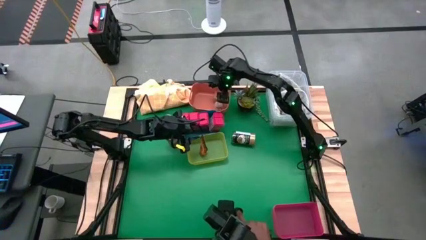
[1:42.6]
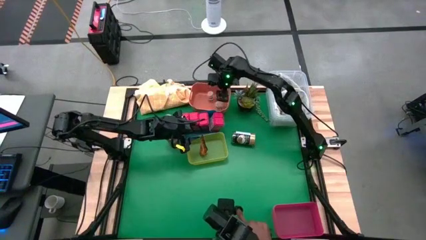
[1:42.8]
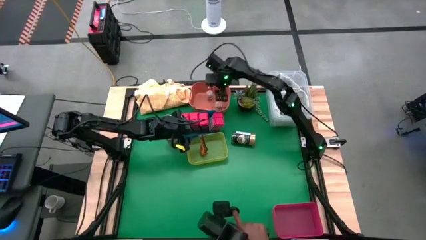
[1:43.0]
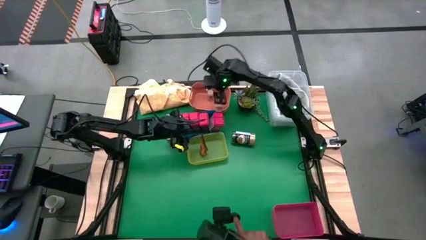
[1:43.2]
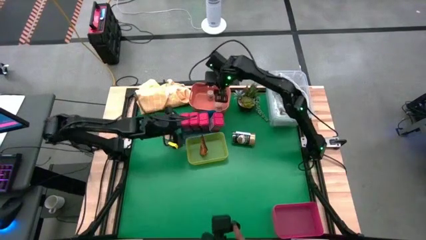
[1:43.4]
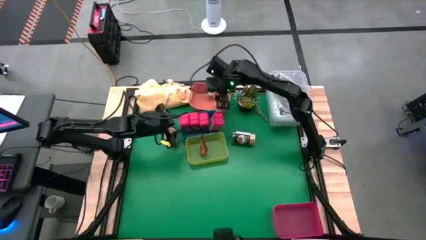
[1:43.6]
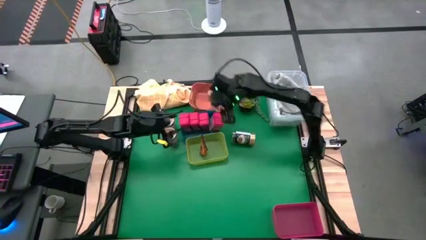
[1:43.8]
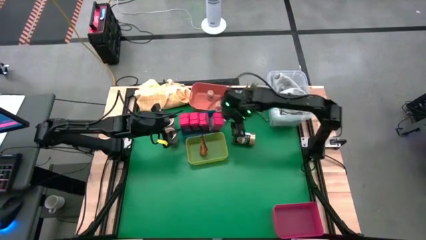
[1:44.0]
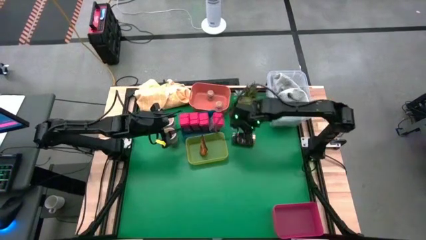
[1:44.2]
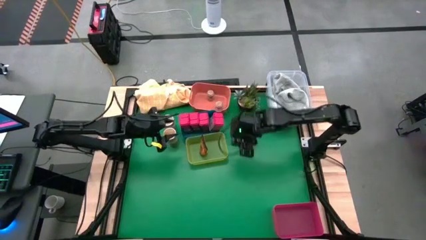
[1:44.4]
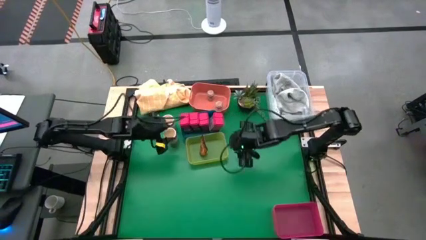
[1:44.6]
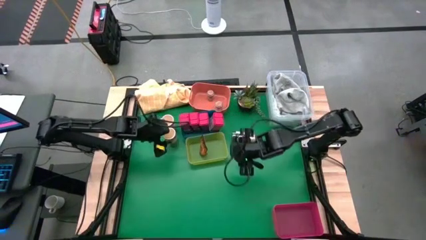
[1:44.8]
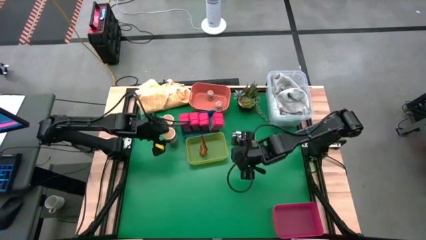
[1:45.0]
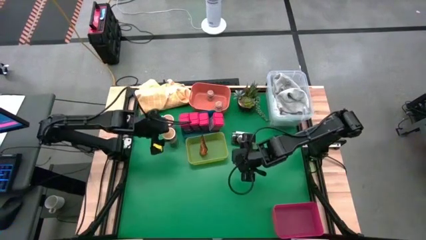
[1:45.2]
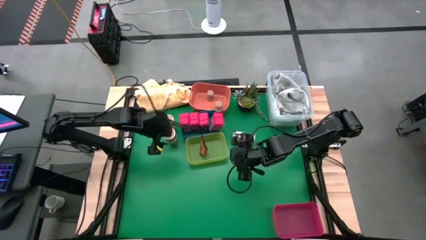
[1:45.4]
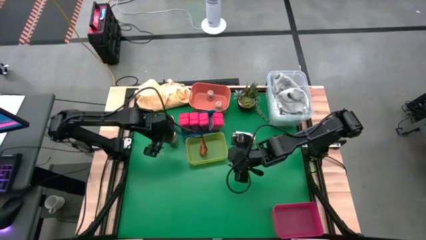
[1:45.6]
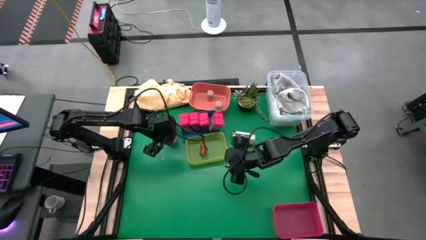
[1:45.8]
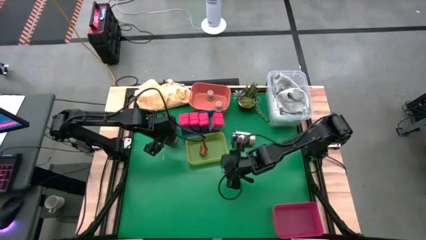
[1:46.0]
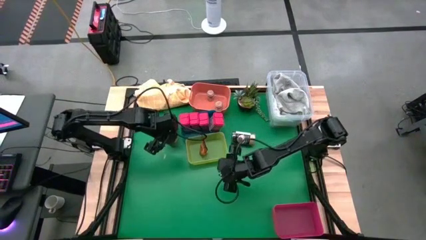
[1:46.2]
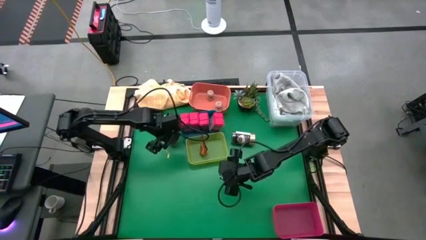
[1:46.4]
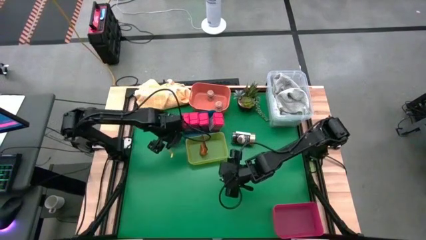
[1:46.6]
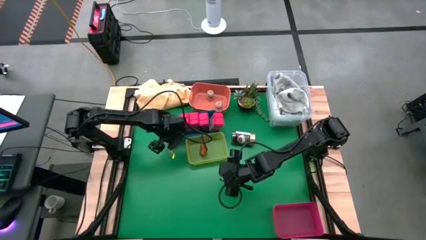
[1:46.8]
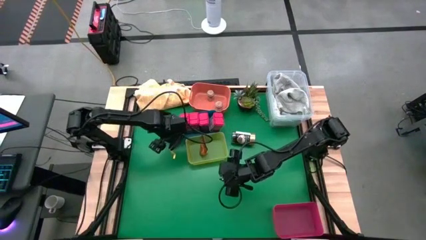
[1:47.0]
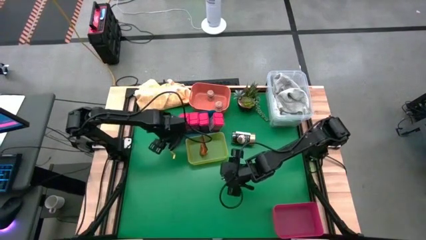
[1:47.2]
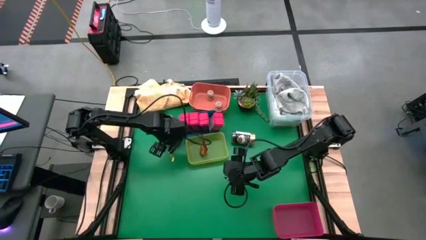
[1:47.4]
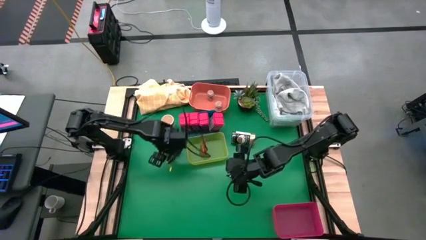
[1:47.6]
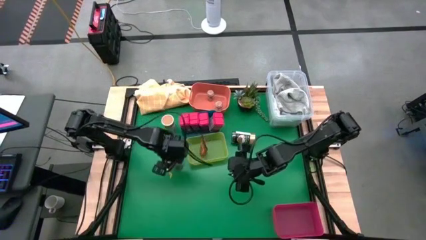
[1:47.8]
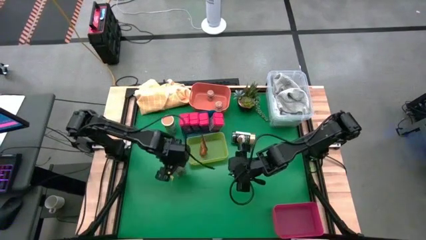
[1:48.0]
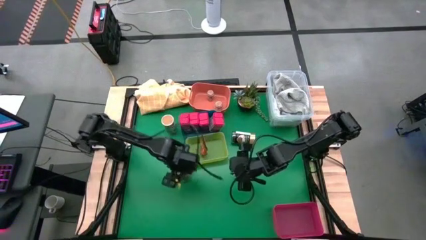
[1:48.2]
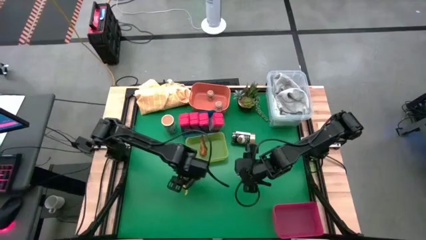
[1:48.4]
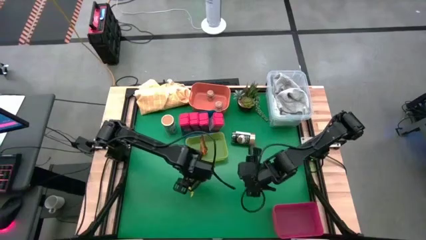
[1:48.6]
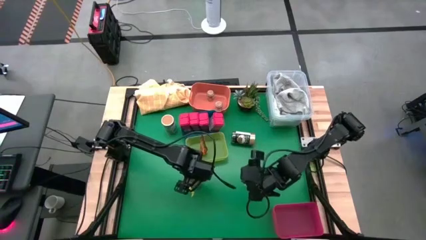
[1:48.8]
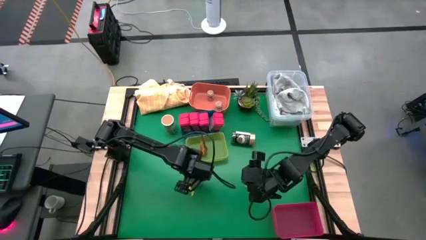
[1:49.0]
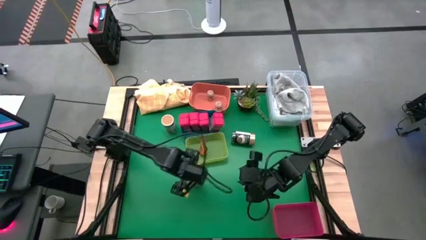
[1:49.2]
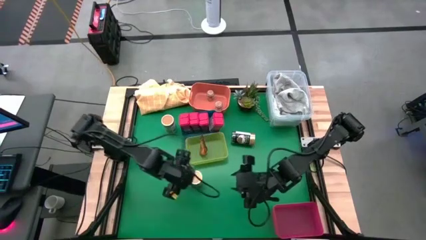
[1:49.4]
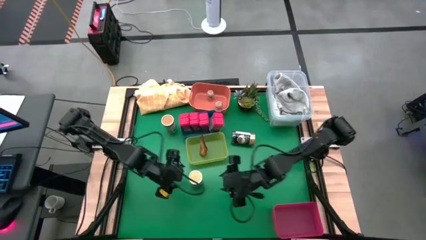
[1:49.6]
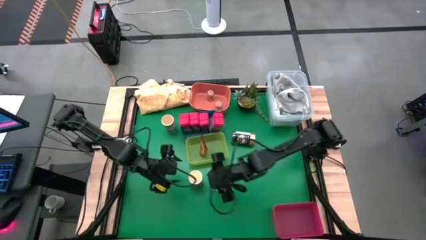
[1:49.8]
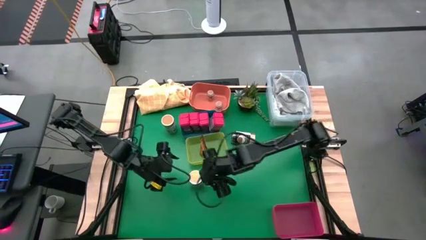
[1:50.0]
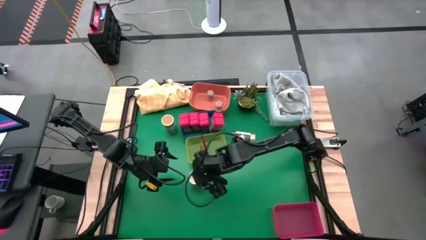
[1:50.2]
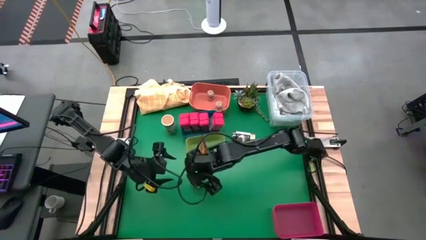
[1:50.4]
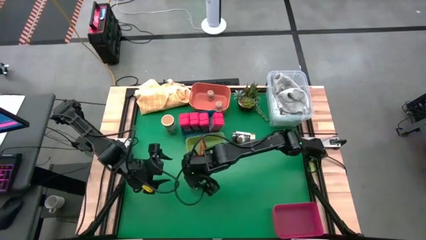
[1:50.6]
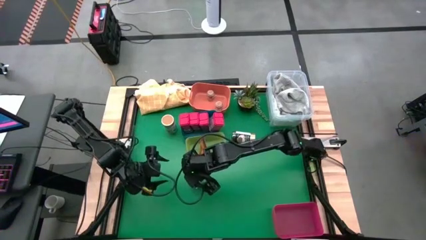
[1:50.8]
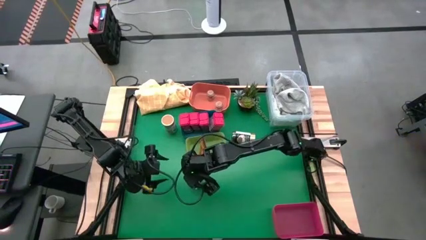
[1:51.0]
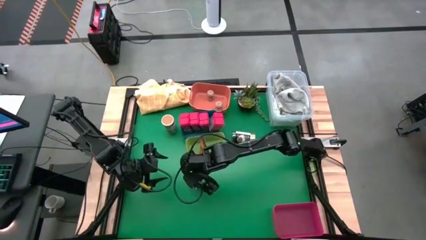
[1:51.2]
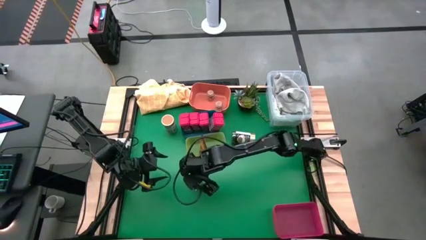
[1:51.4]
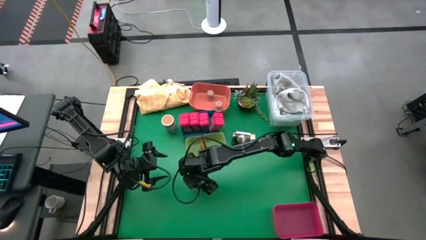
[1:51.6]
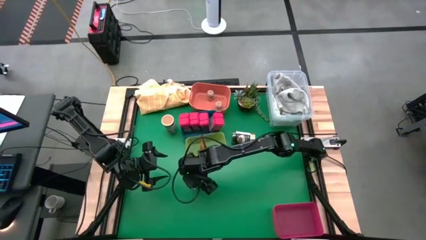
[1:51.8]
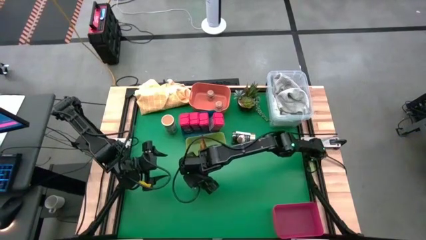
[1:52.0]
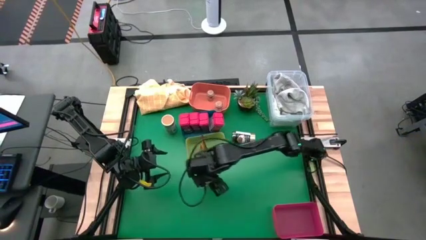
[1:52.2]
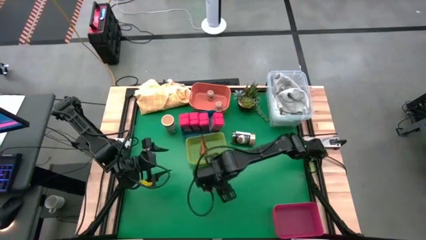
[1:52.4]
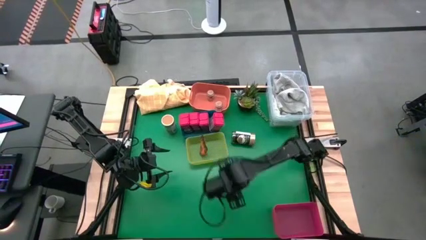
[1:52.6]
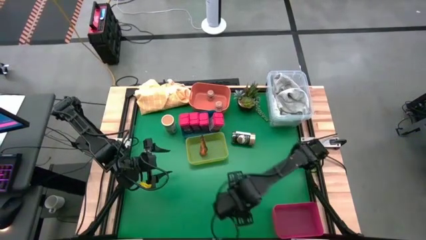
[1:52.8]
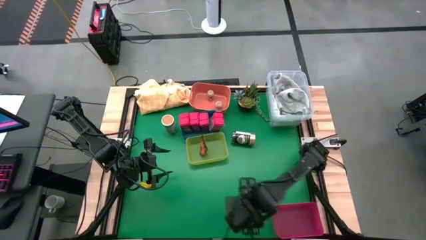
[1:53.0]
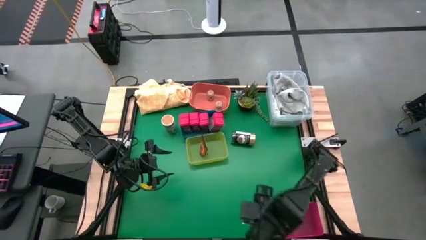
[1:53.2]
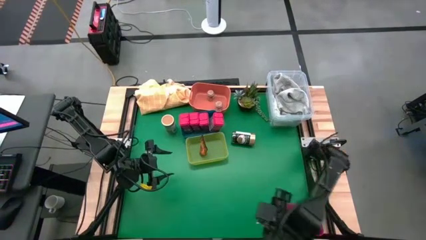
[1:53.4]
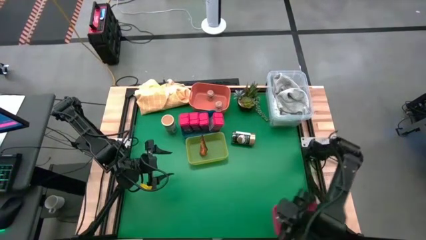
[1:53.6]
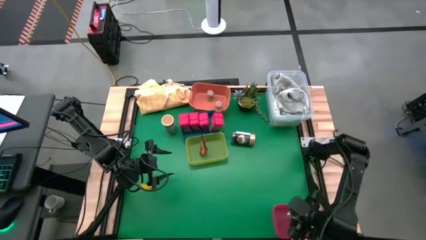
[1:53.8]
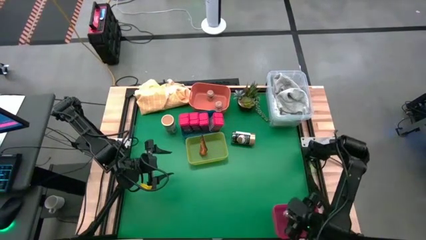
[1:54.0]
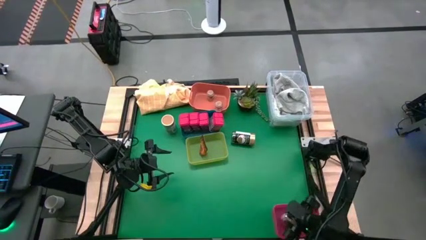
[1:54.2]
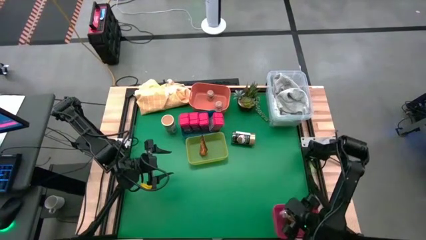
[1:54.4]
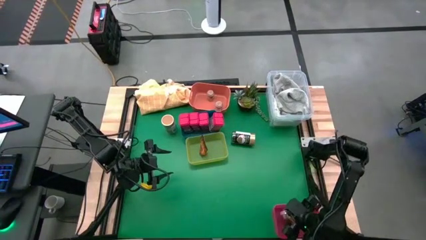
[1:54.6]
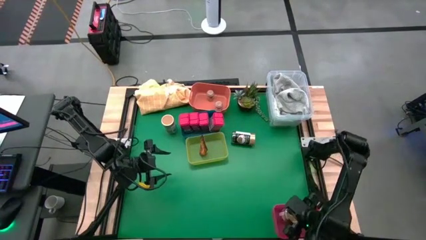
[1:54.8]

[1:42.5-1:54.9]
Task: Sort spices by type
Put the gold seasoning can into the pink bin

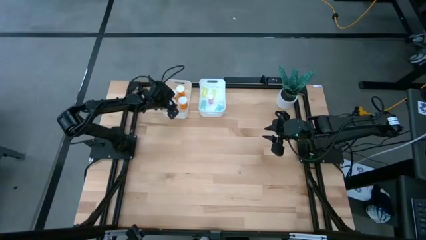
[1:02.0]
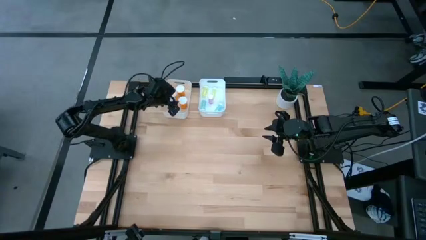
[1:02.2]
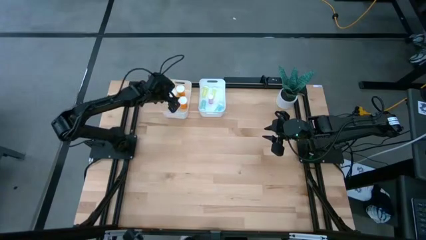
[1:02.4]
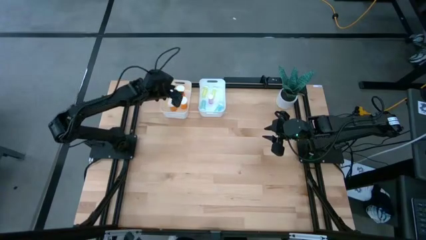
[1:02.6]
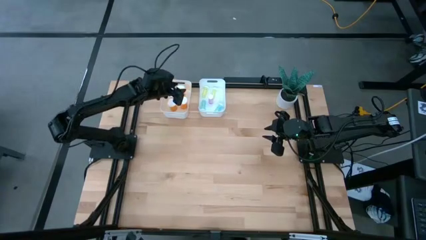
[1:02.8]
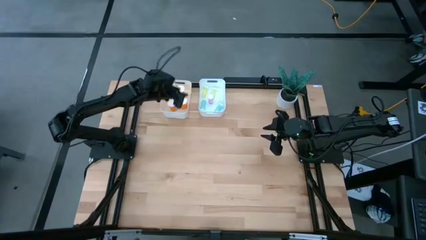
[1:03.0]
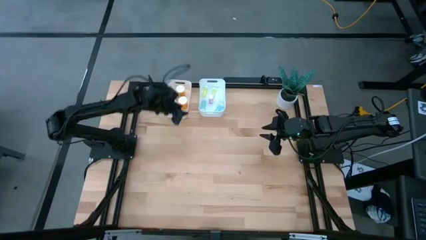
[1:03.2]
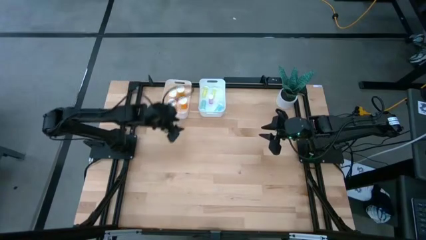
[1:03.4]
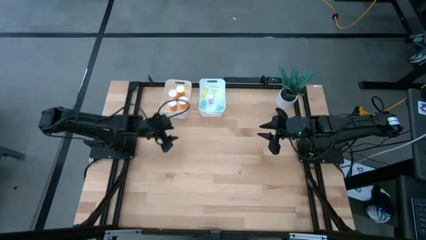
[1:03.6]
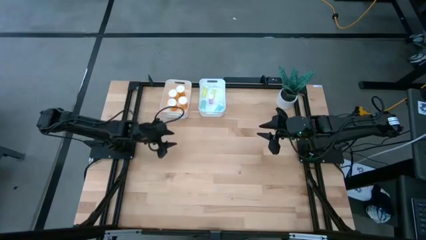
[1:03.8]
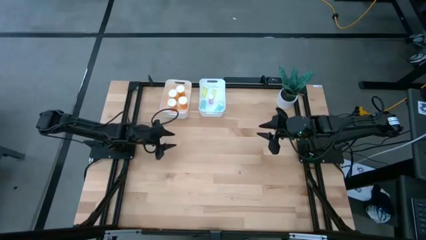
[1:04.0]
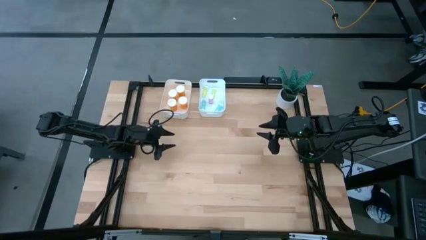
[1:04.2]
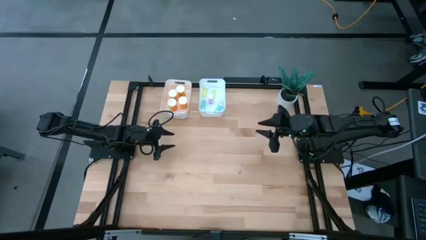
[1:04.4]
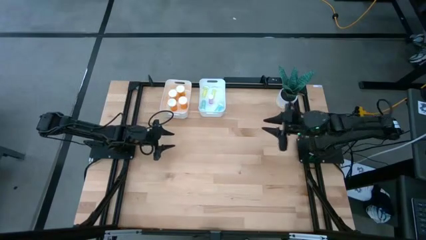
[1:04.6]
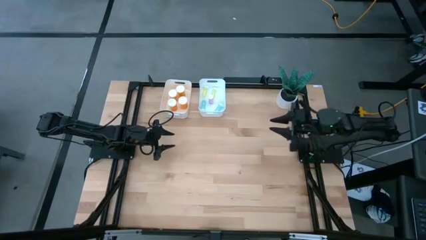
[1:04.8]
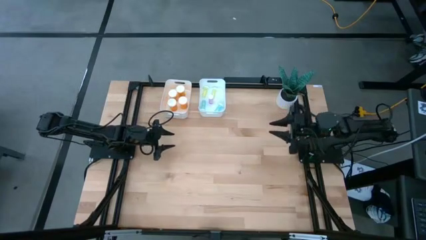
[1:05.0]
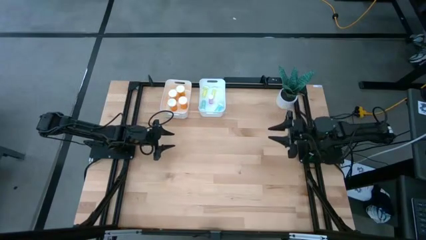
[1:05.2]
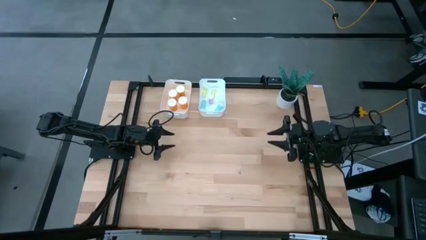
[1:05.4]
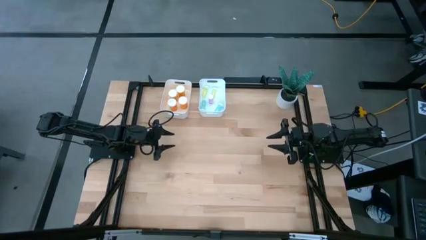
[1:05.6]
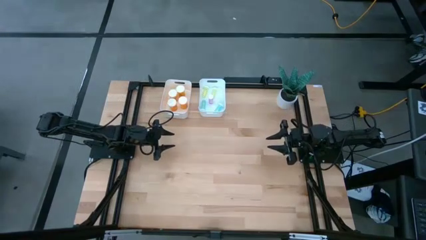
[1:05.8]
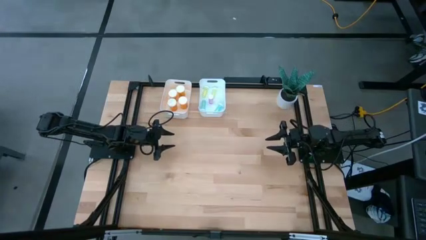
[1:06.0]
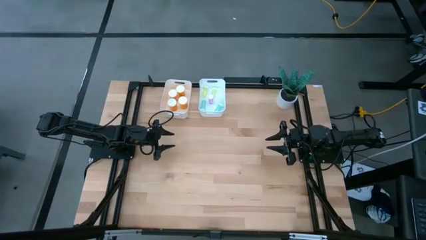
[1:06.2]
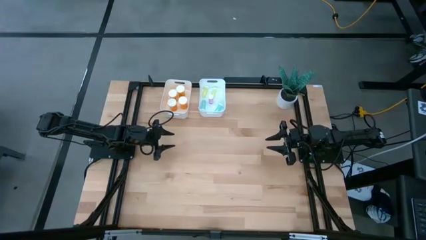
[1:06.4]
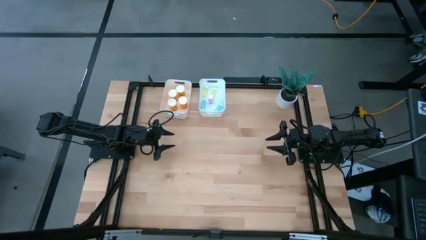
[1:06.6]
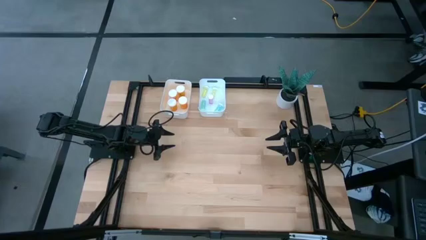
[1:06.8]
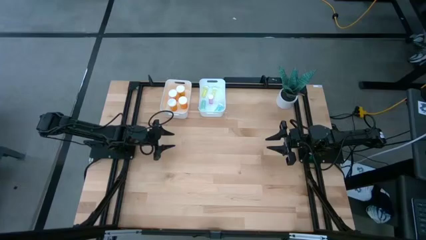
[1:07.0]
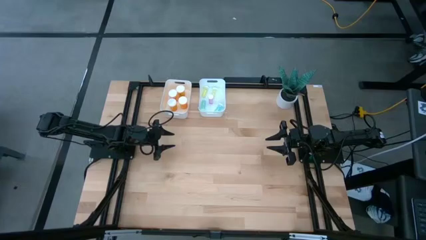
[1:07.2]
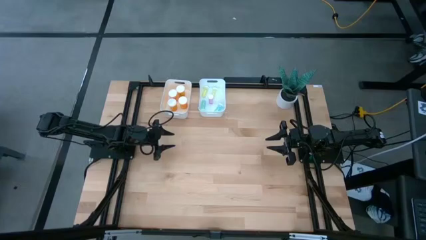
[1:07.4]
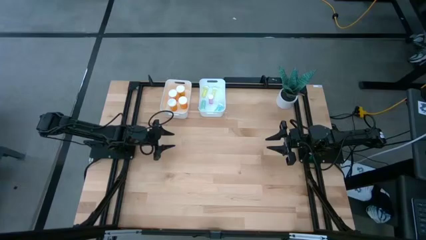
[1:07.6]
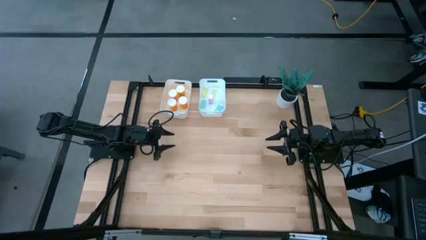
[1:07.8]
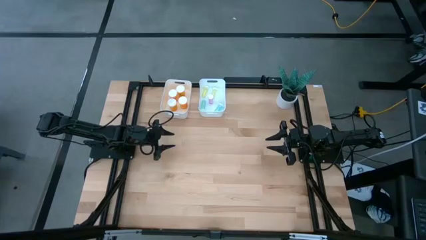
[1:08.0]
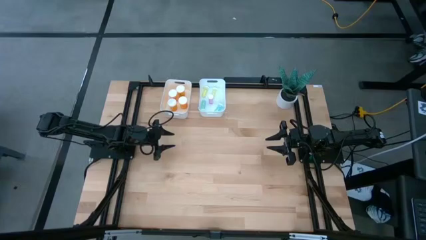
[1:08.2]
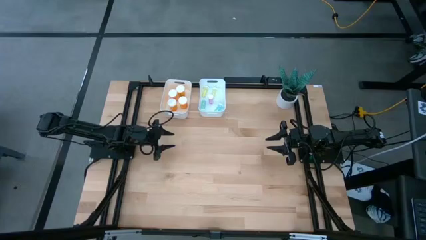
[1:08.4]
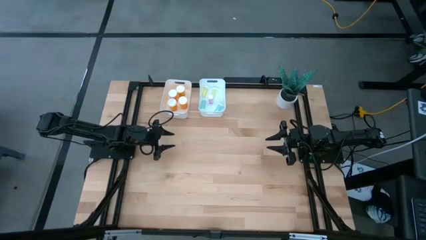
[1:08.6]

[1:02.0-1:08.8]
Task: Pick and place medicine bottles into bin by pill shape (circle, oval)
Return to Home Position
